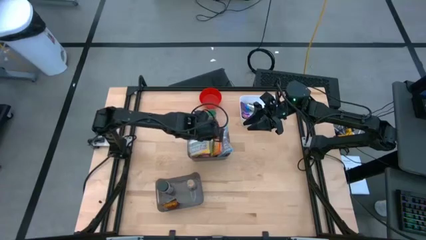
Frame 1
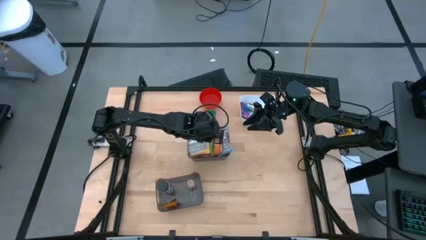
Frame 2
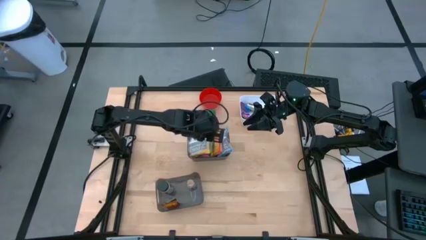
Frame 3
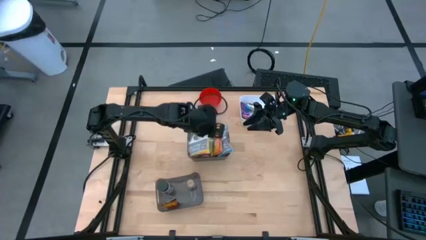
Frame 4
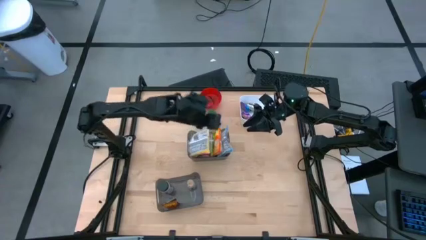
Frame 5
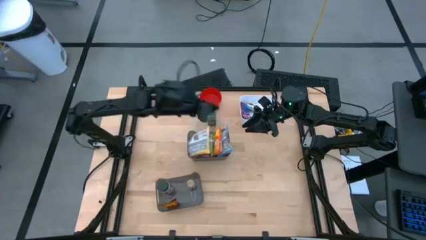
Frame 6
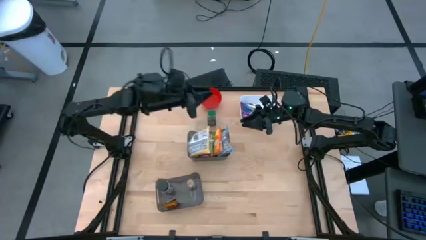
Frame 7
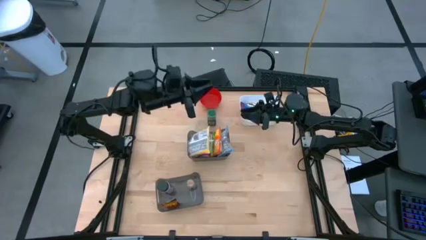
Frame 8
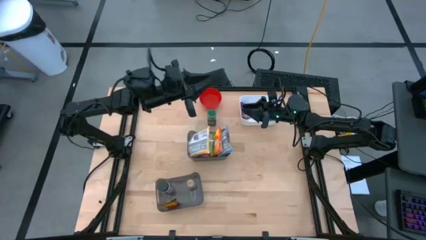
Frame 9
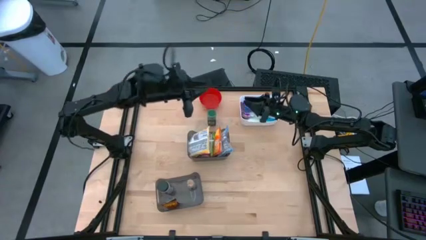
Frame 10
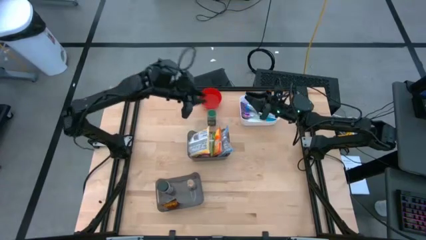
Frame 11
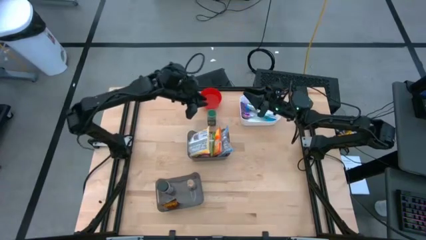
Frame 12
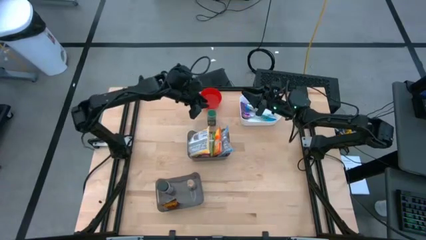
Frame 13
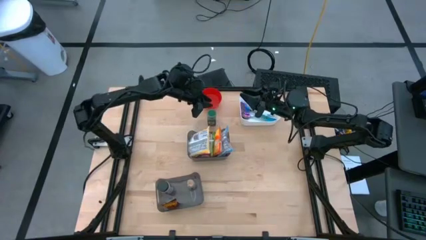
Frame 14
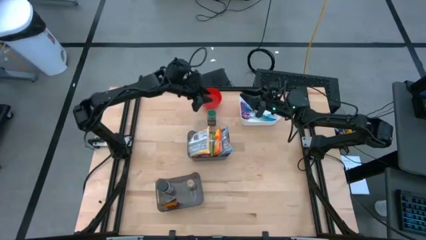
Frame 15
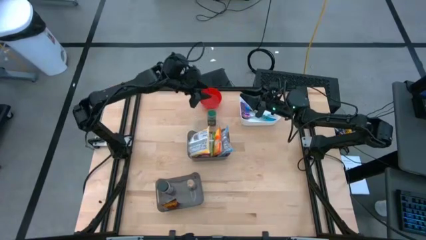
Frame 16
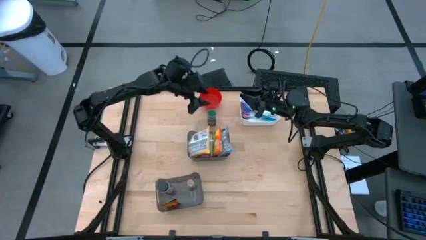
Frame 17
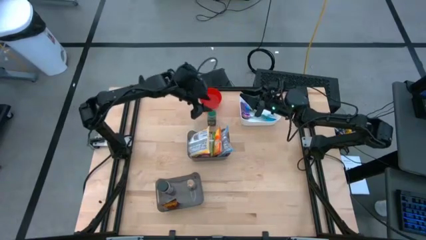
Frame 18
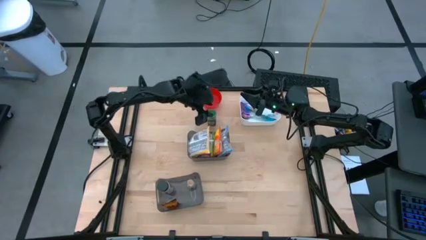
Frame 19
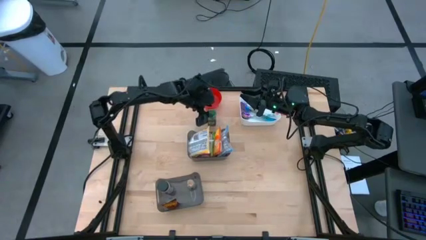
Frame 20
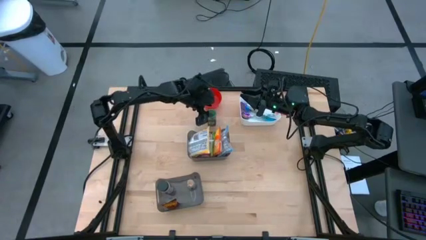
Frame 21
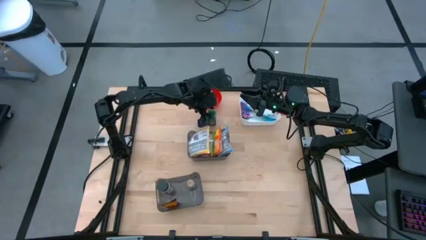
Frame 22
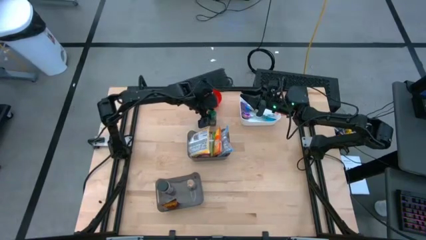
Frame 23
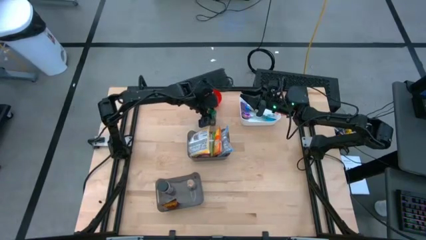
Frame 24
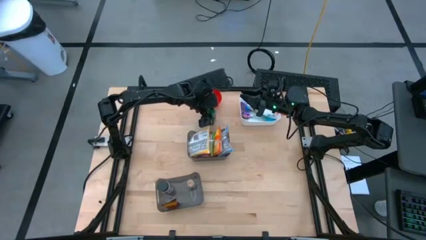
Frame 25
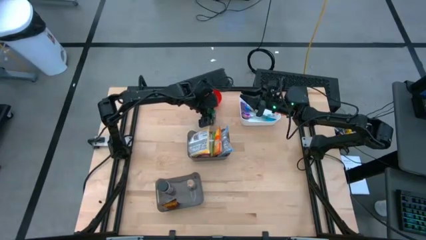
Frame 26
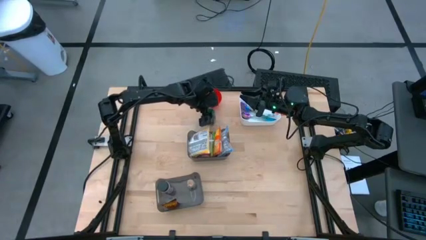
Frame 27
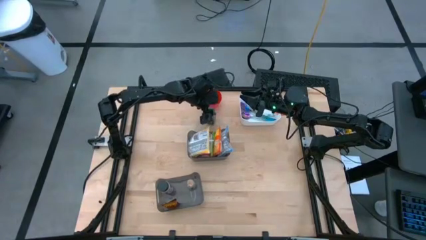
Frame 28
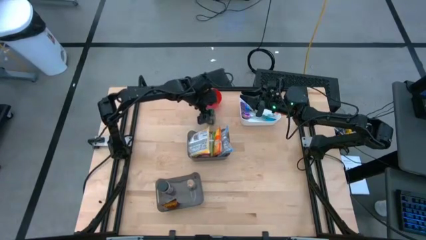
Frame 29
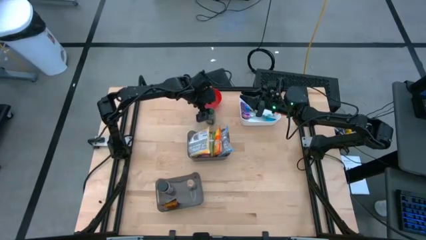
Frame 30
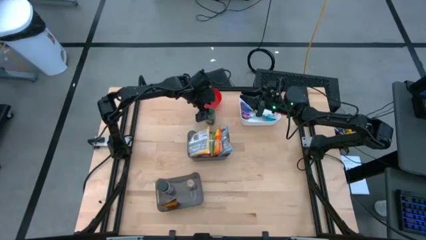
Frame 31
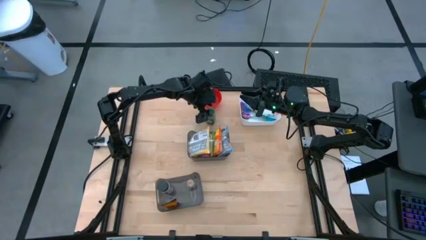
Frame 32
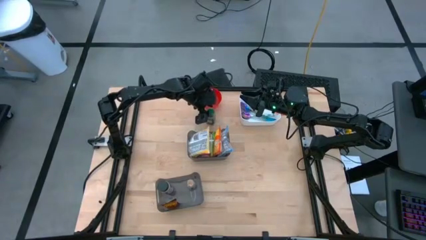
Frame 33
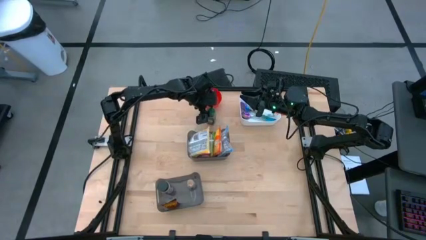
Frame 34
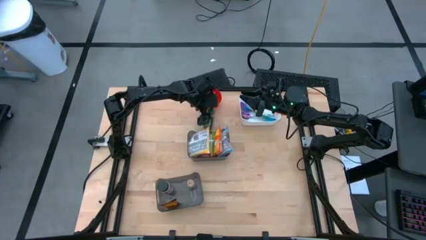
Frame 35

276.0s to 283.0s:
Task: Pick & Place Food Item
Put the green seasoning bottle into the bottom black bin

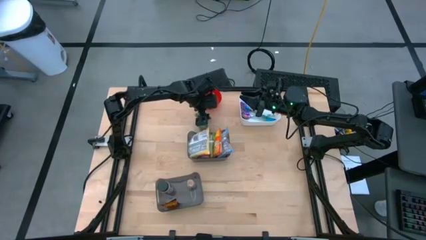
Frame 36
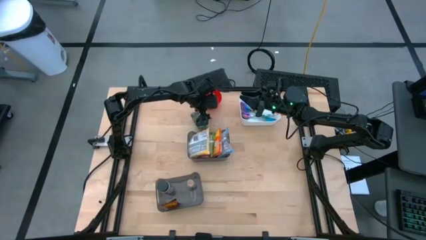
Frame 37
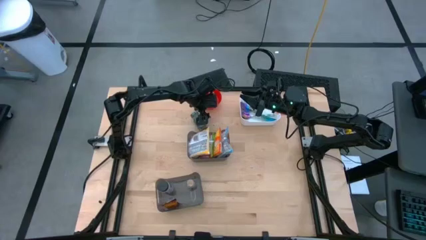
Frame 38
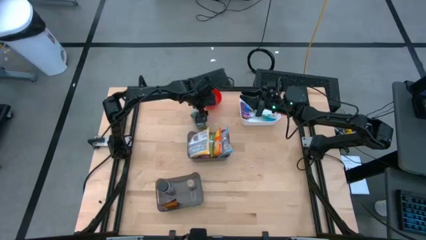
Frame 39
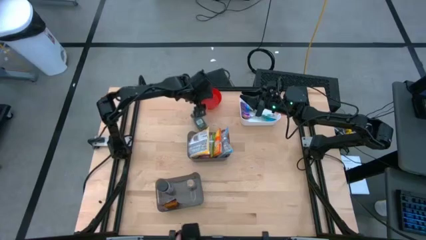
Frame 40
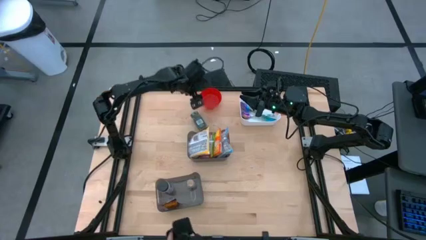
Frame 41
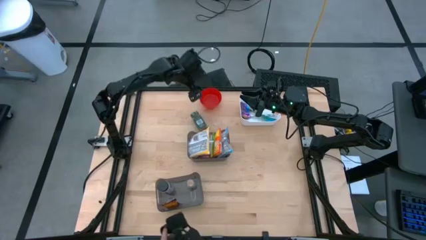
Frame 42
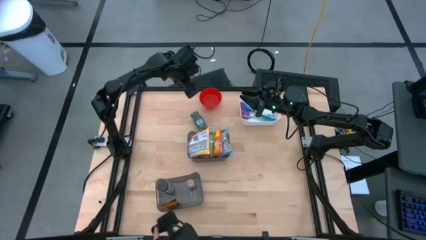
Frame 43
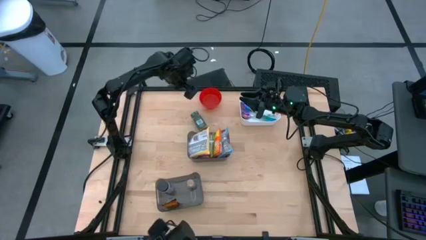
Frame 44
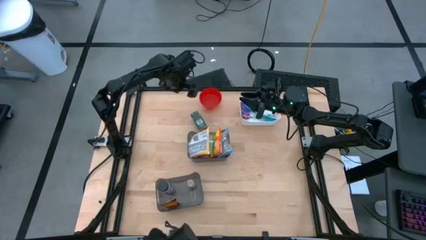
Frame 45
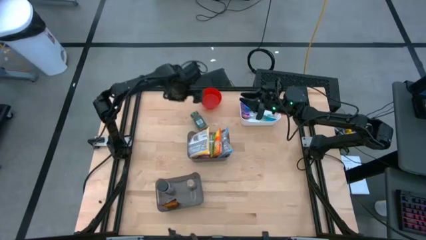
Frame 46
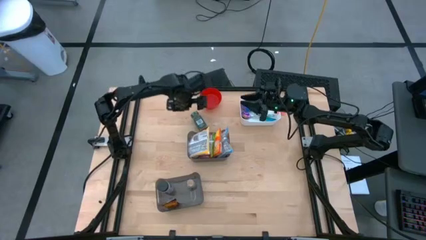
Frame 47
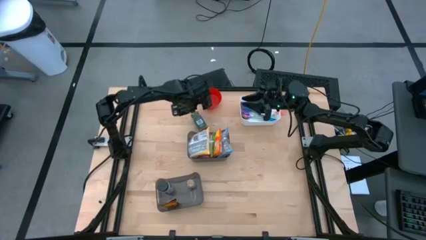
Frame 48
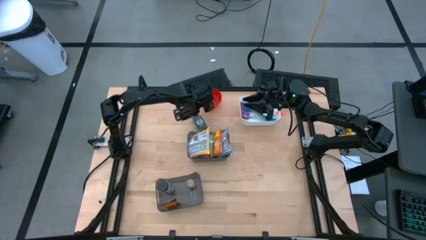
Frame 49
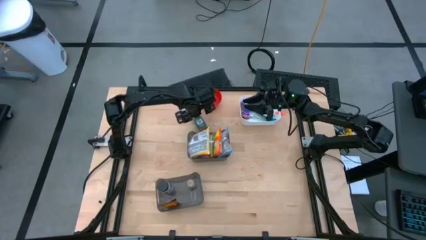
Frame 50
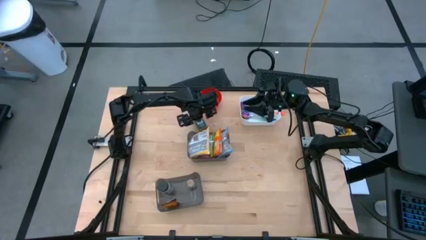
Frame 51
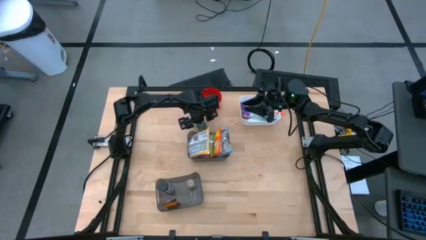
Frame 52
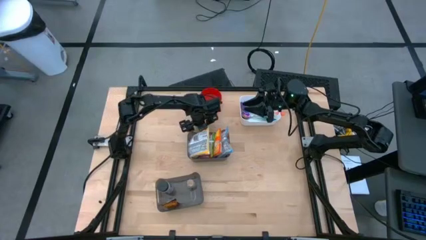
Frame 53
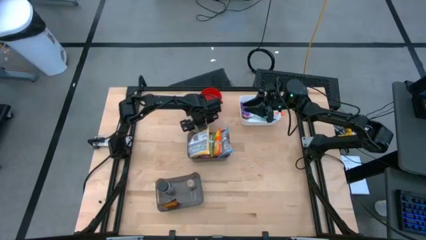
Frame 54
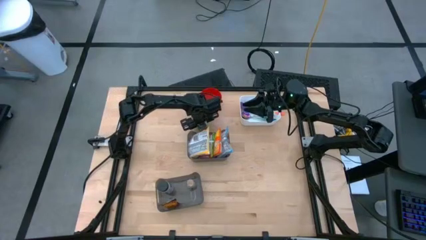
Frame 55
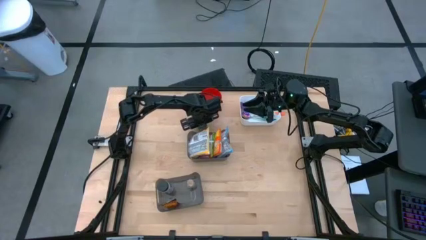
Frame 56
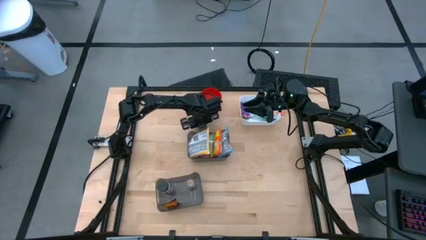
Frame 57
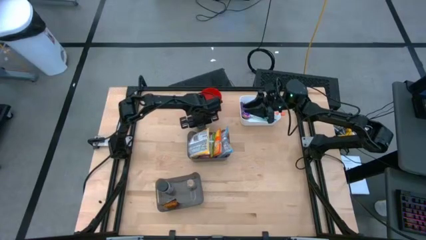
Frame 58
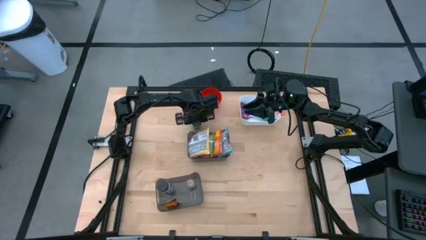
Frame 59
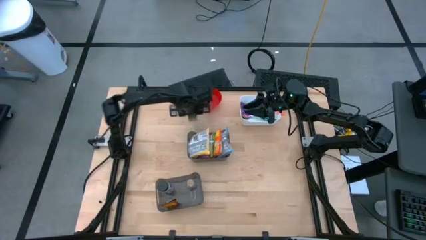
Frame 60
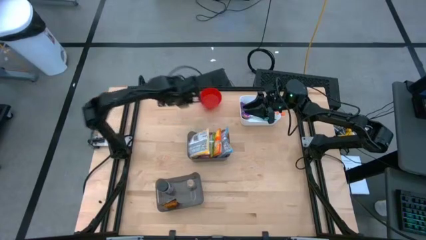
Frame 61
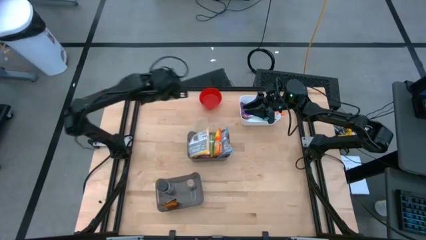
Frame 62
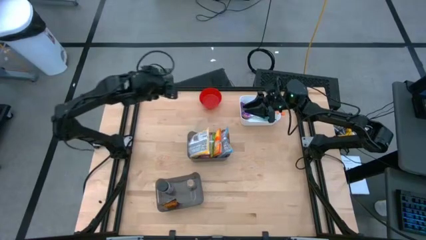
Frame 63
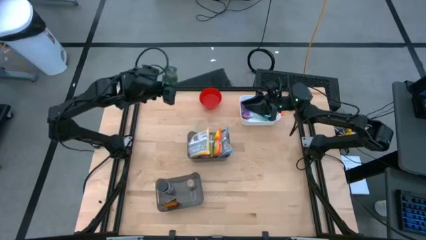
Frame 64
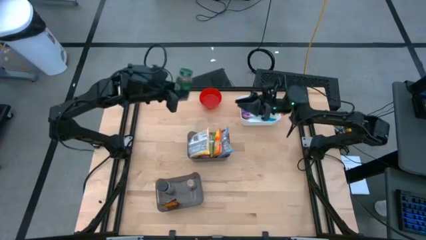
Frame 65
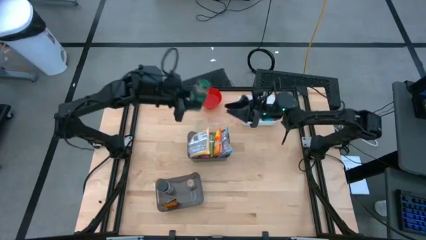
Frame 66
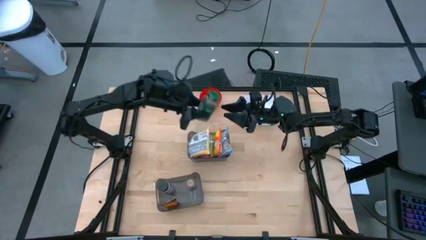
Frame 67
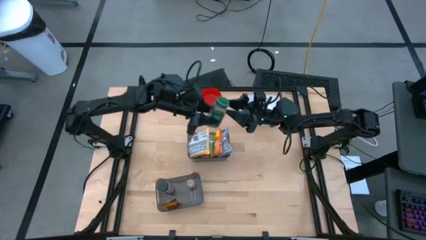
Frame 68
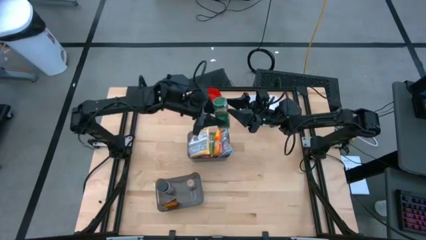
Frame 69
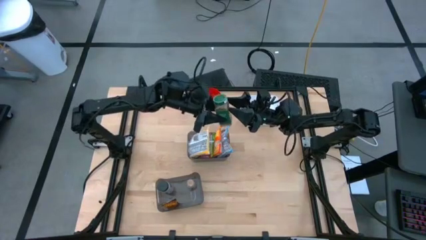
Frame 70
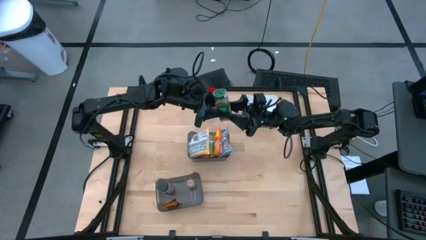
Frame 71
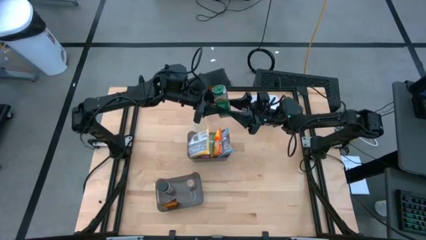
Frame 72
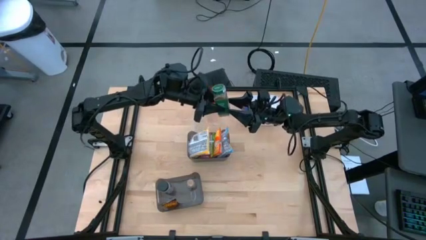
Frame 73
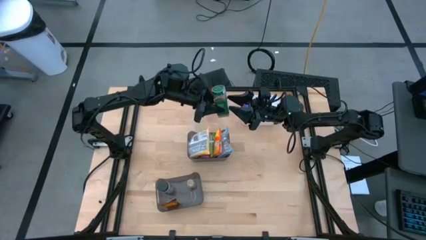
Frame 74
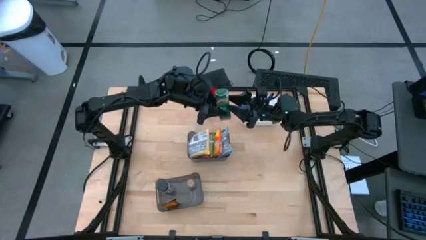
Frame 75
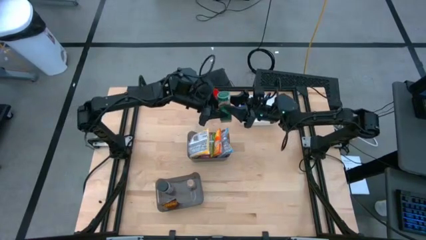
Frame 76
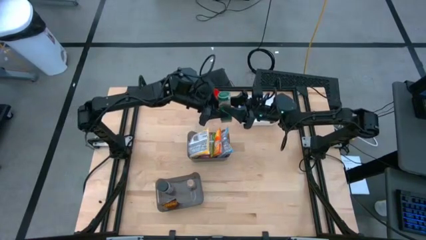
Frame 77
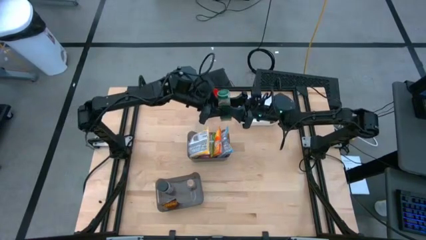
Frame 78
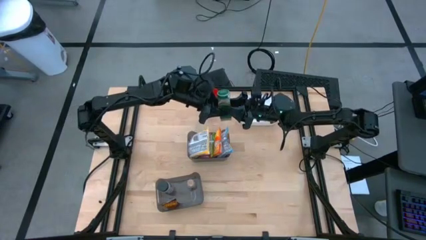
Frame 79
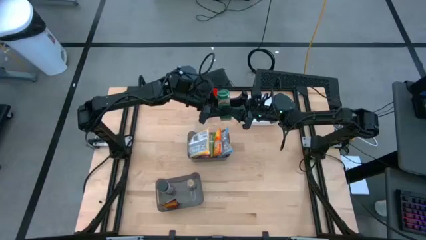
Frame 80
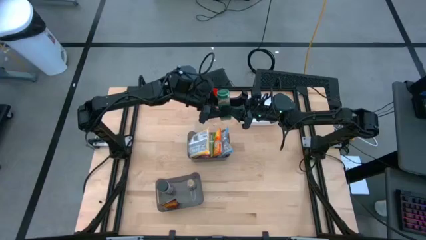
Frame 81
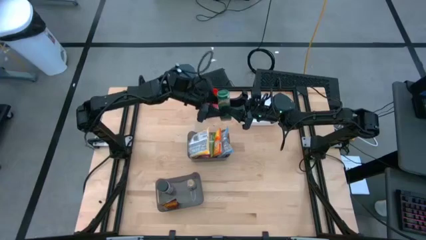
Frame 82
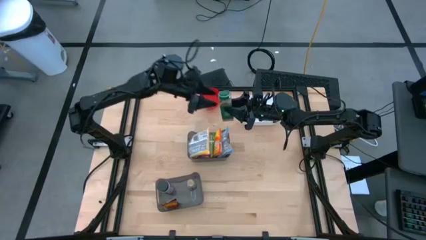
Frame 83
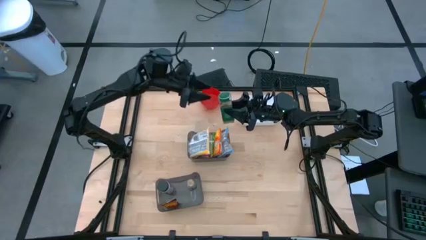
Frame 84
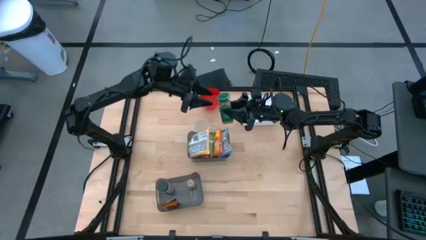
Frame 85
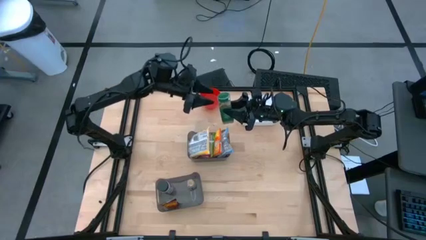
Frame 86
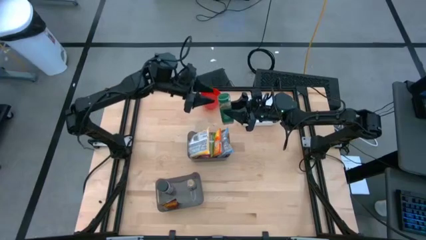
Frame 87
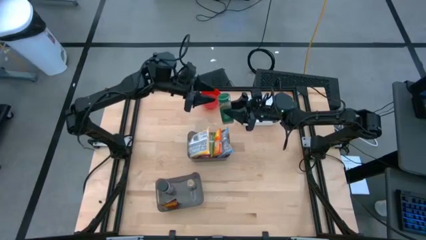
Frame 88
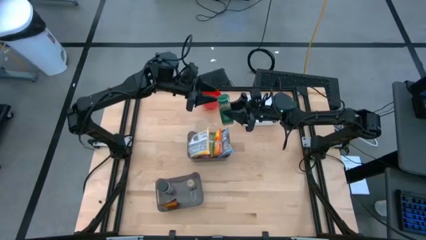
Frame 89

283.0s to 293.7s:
Put the green seasoning bottle into the bottom black bin
